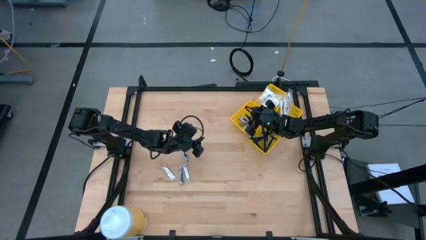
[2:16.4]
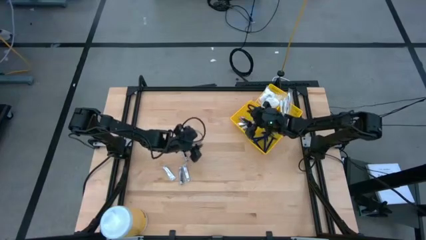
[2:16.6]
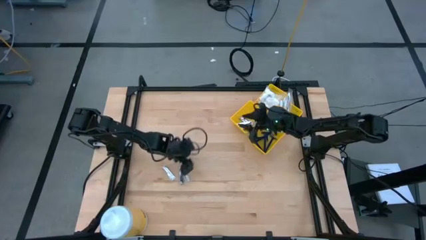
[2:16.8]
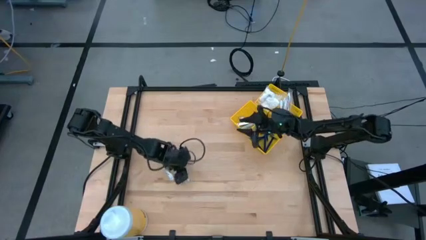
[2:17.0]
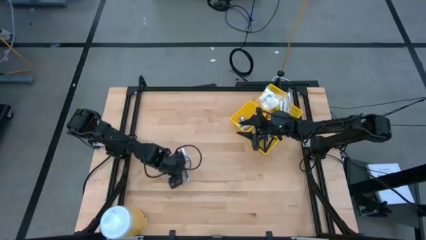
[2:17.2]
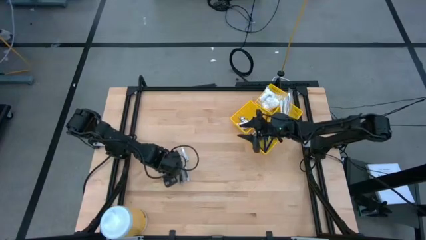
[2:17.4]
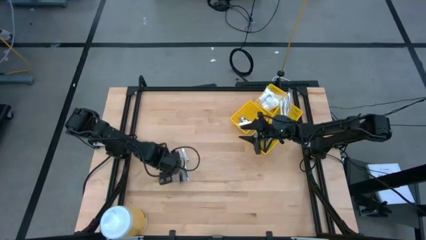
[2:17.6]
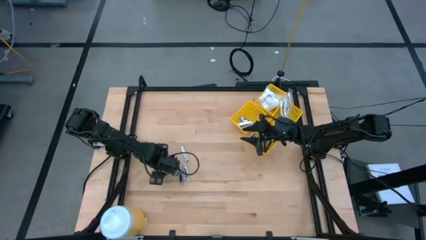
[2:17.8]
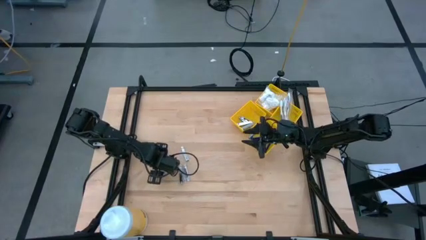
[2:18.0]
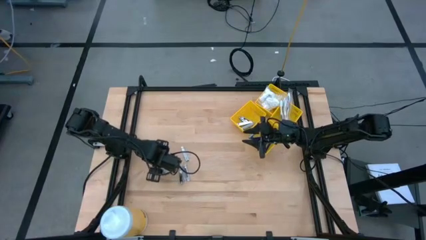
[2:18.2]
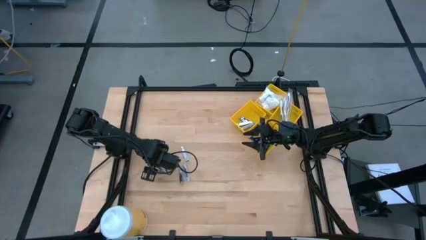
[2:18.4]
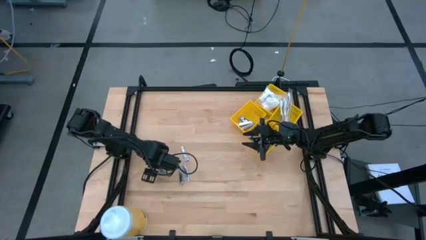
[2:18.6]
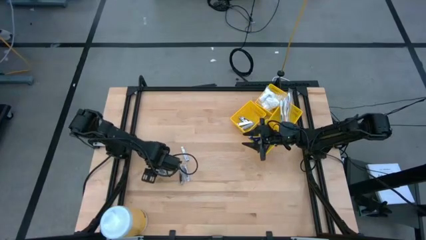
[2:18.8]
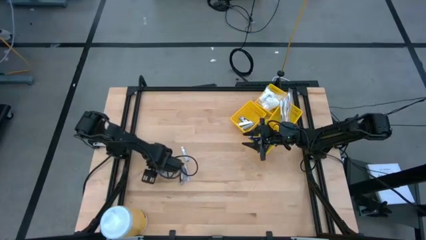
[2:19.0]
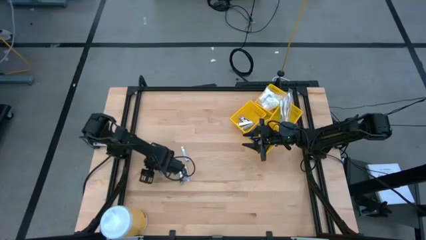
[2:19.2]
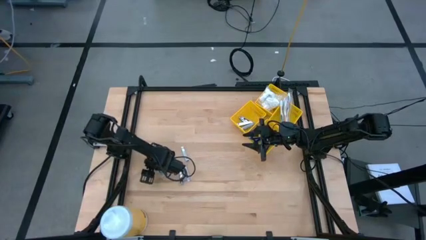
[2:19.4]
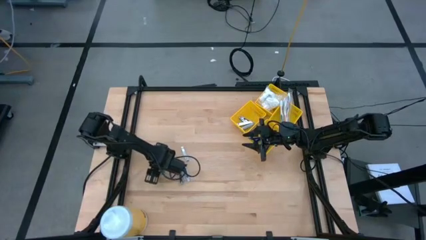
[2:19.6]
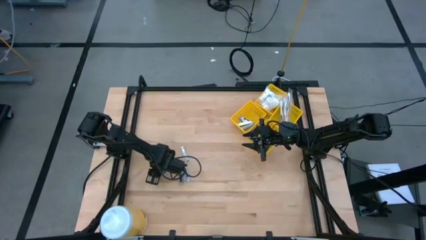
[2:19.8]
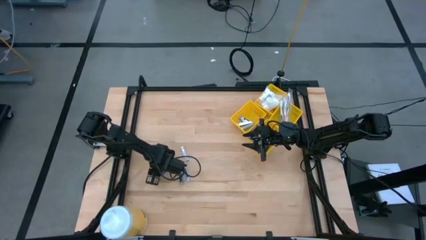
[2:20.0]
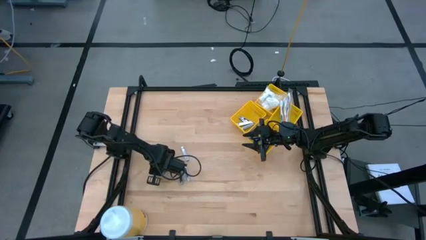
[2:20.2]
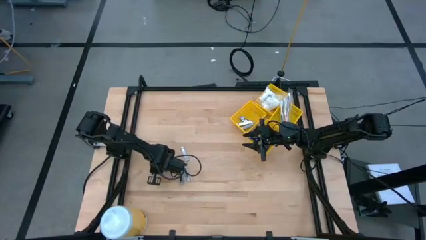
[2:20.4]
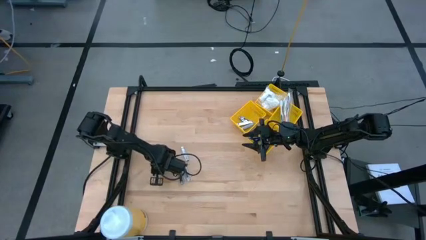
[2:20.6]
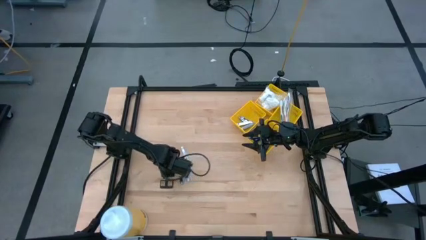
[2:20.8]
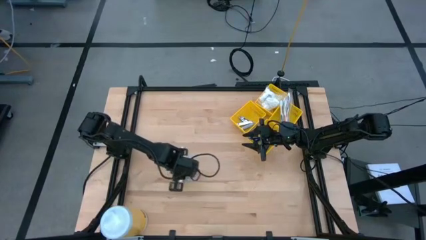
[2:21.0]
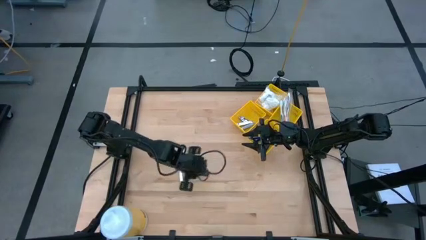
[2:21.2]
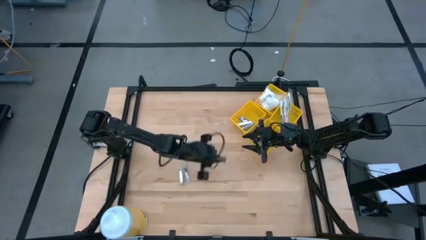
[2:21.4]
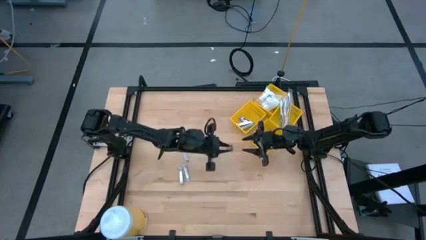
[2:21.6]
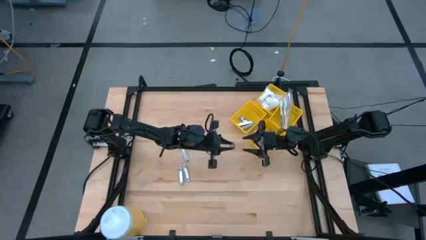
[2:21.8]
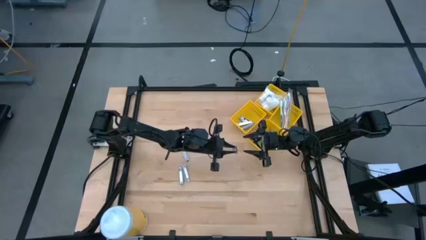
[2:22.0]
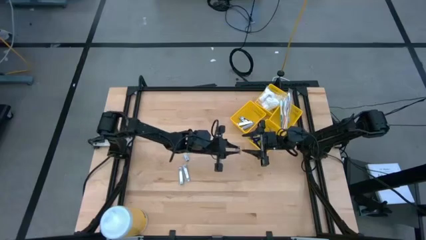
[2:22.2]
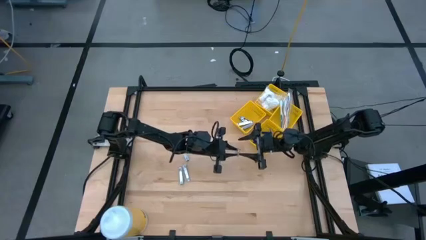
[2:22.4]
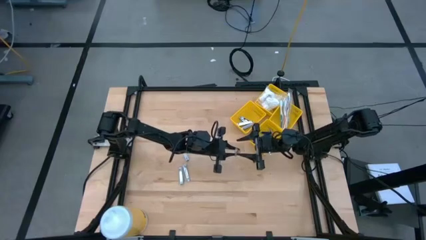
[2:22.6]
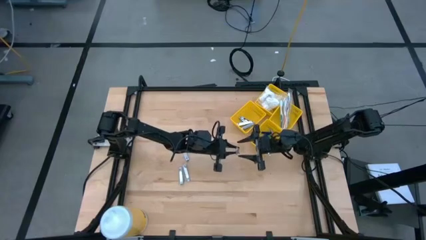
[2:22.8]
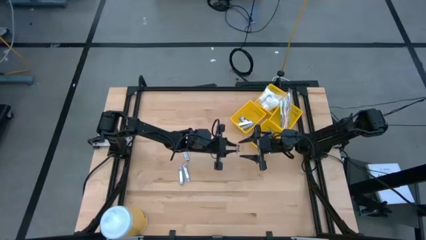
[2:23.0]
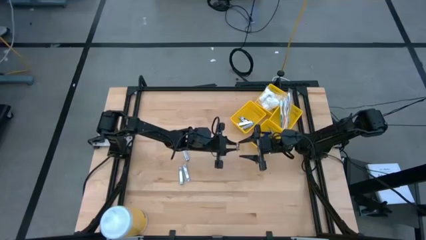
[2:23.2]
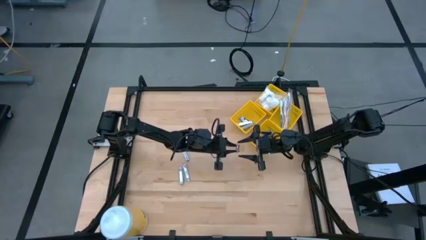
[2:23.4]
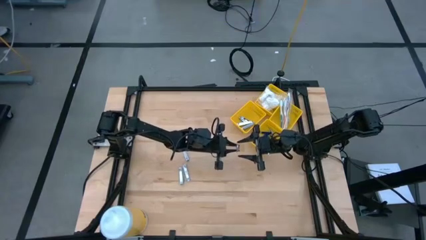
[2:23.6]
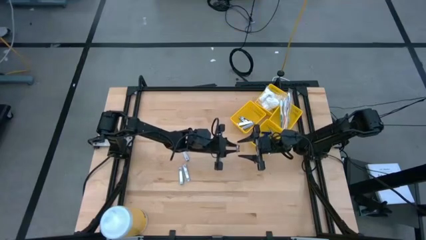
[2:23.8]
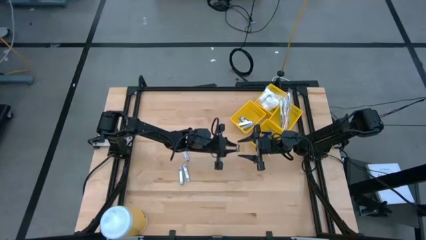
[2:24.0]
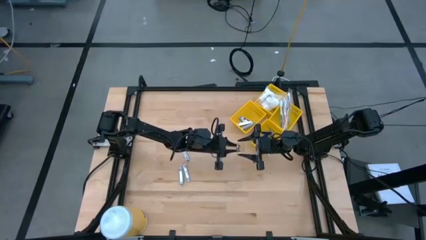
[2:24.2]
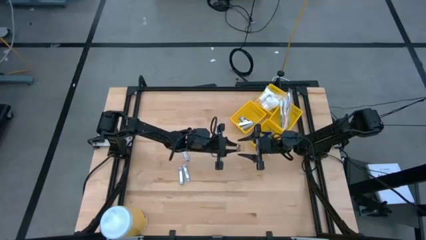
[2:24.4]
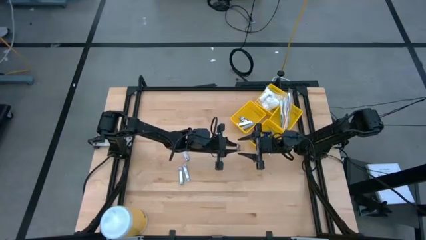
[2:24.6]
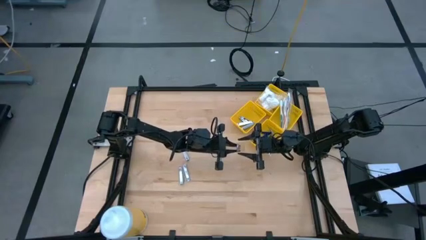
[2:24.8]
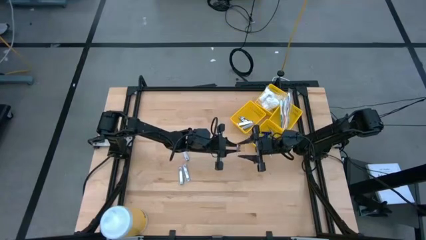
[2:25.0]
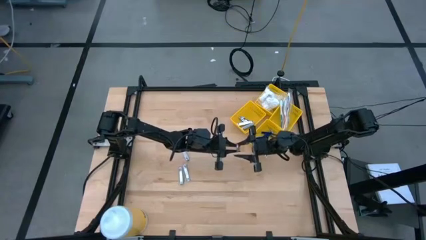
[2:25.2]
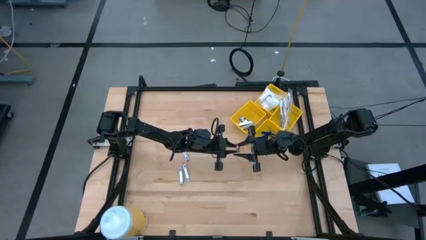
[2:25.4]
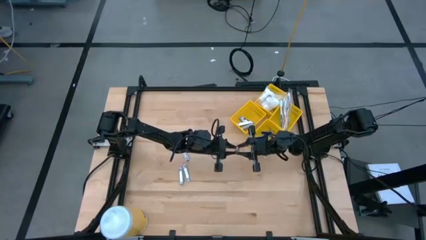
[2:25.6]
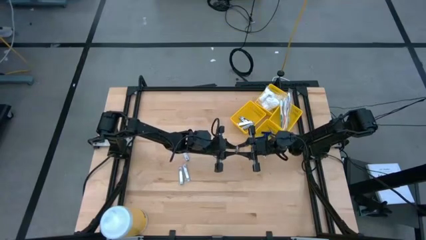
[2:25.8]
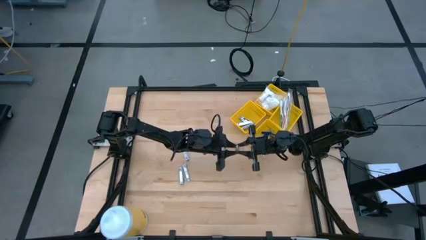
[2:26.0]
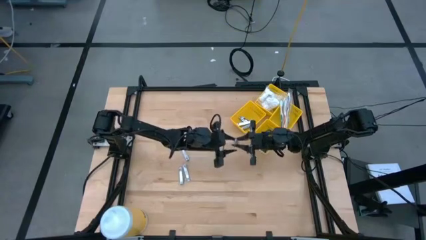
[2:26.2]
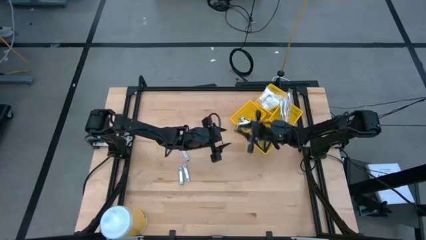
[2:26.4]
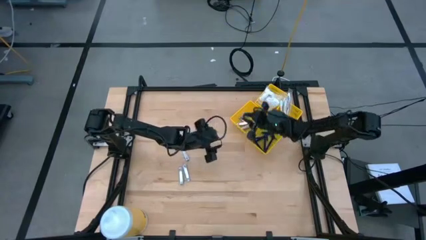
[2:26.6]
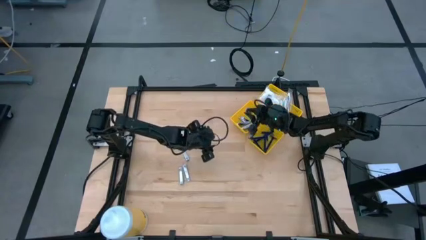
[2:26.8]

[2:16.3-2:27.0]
Task: Pick & Place Travel size toiletries
Put the nail cutter into the bottom left yellow bin

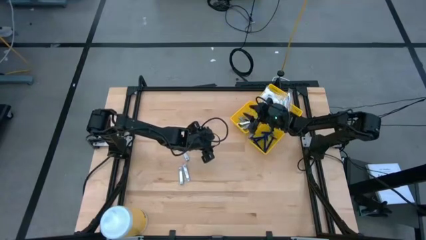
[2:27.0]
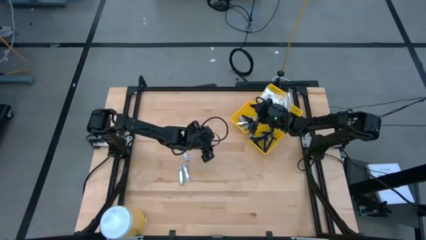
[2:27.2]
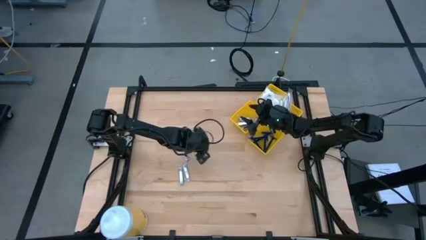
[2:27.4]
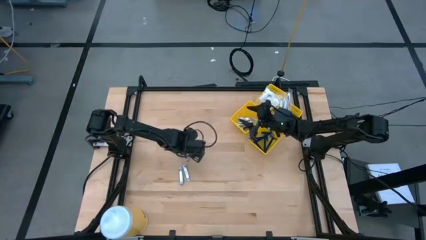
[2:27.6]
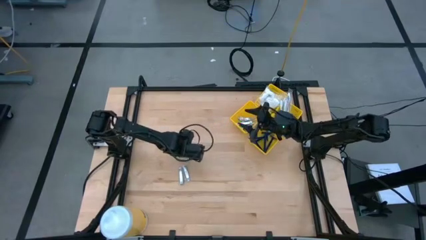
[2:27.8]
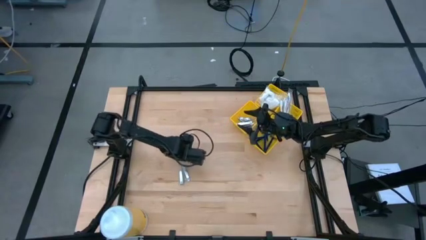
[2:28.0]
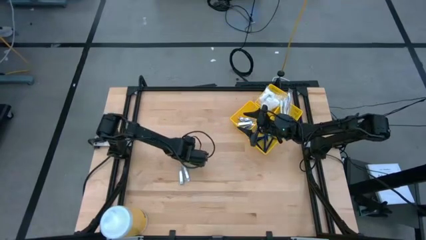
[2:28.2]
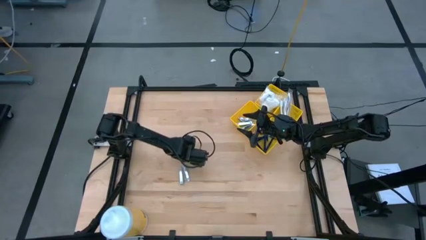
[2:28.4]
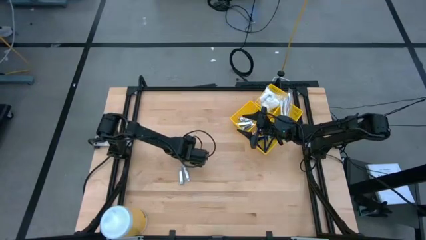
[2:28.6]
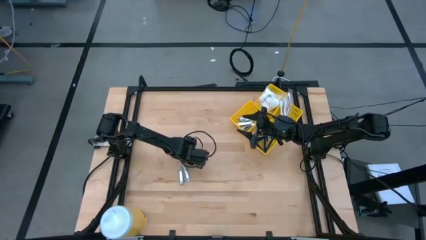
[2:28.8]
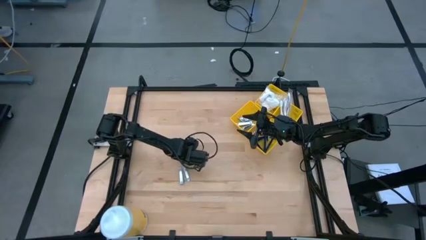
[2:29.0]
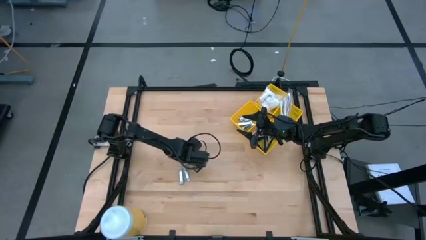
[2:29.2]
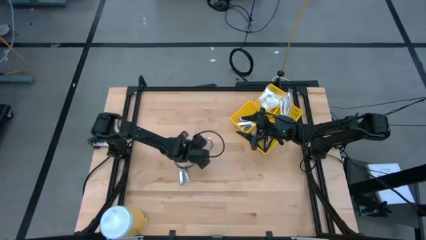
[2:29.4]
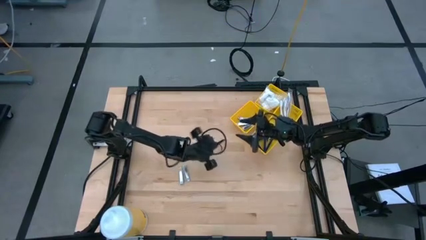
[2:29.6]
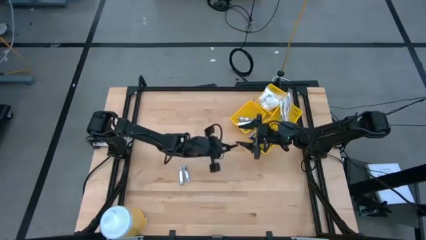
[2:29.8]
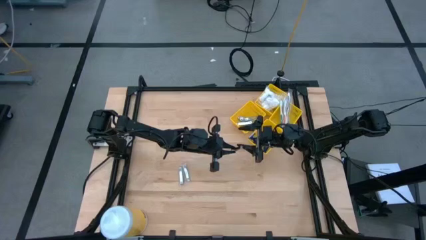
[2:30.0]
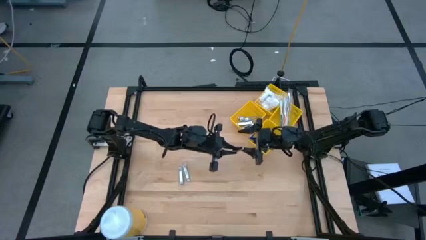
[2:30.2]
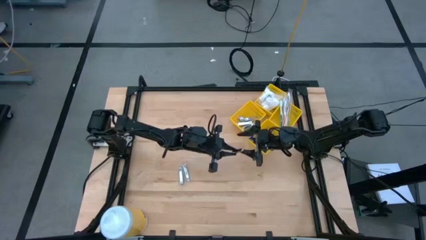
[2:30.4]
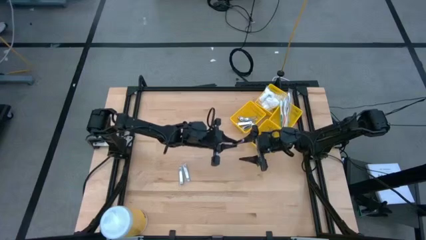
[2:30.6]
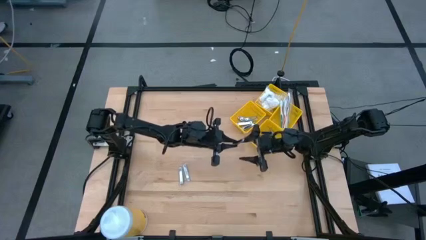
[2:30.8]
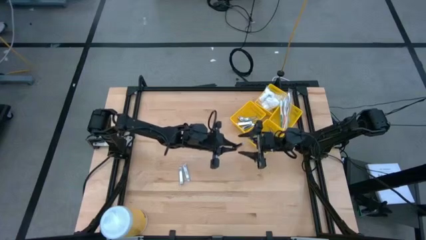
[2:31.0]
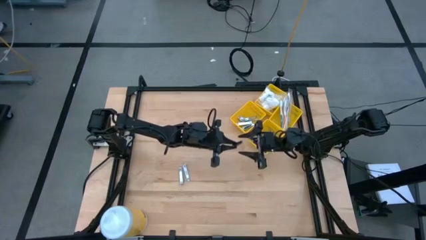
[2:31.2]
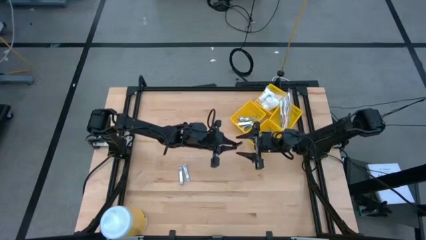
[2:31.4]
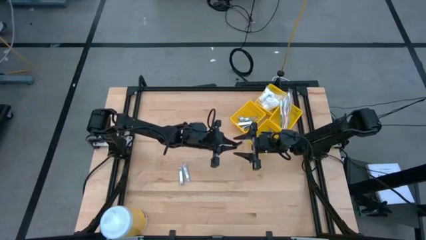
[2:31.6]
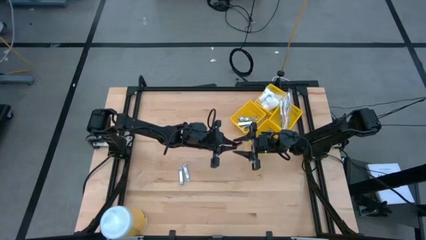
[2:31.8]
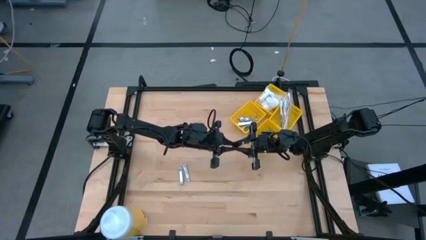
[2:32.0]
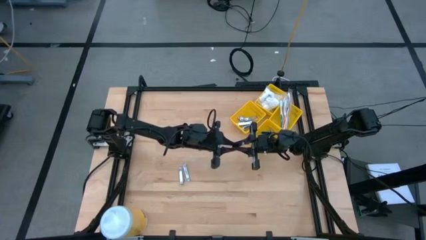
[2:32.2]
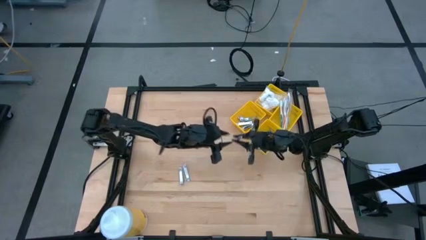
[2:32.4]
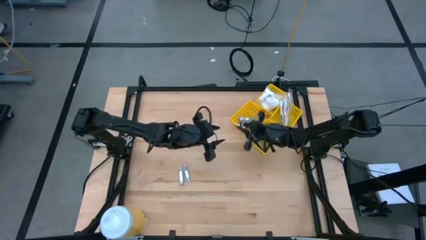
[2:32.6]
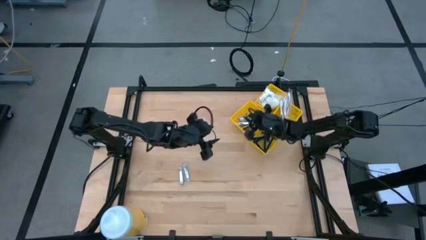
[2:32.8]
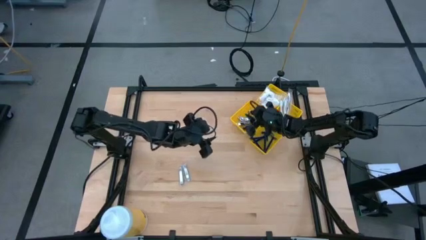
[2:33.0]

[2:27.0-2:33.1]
Put the nail cutter into the bottom left yellow bin

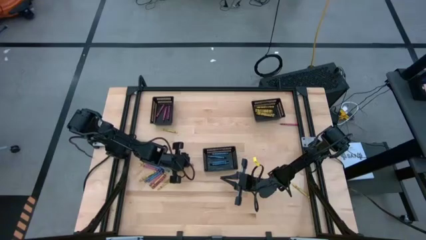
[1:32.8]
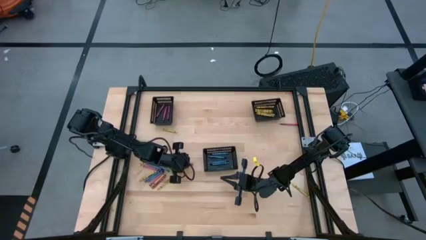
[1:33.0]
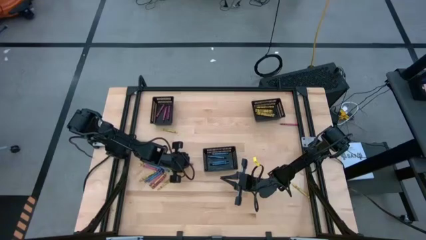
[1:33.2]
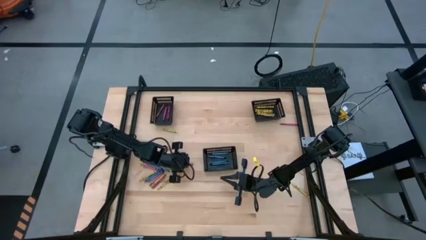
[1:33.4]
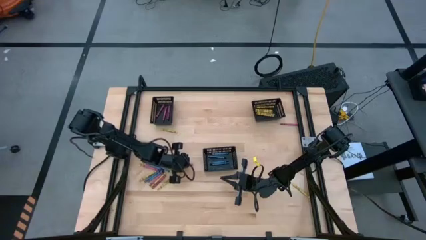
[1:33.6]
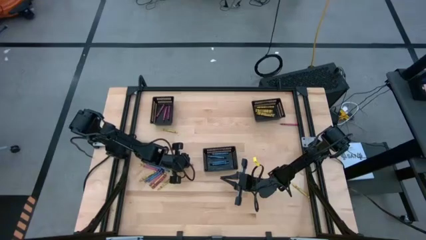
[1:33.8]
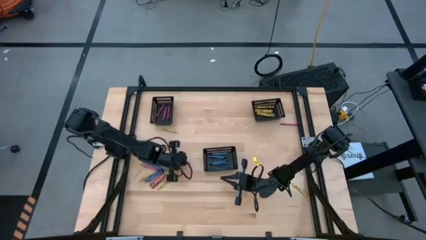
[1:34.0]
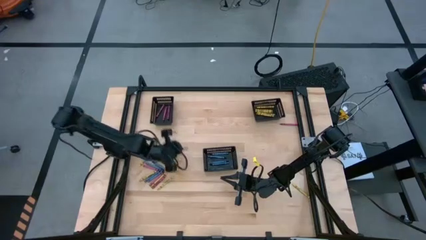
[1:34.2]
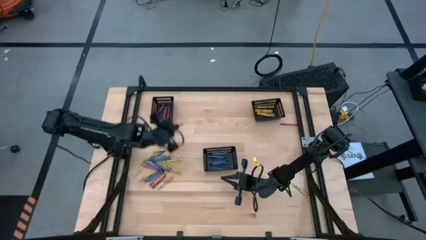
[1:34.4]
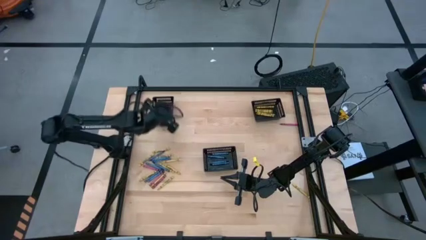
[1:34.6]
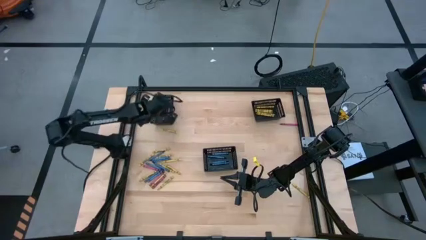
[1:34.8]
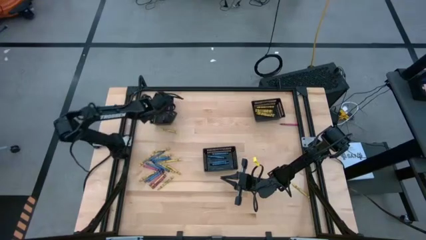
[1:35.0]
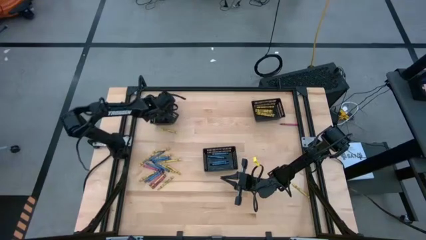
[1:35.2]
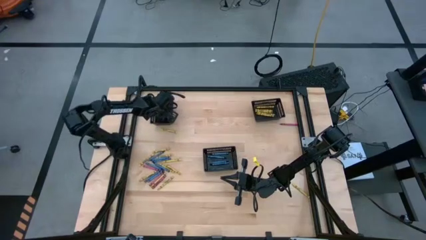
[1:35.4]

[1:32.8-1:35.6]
Task: Sort crayons
Put the pink crayon into the top left black bin
